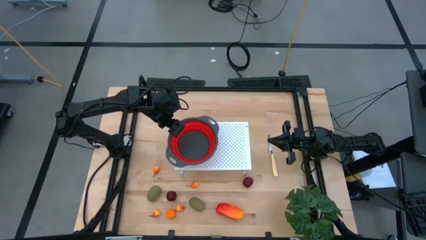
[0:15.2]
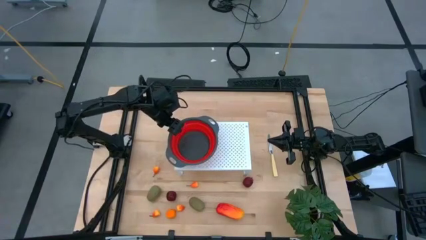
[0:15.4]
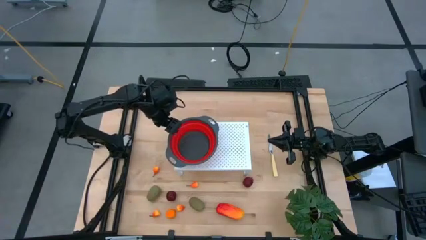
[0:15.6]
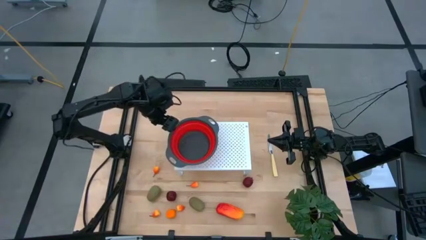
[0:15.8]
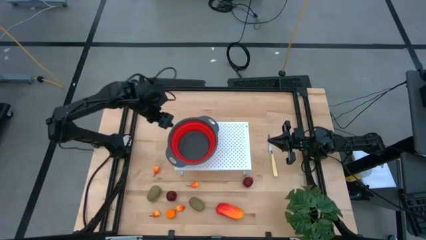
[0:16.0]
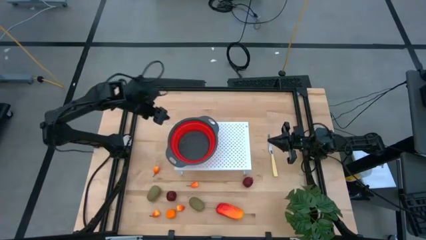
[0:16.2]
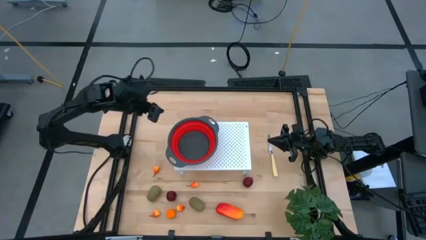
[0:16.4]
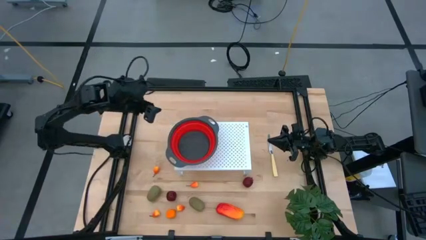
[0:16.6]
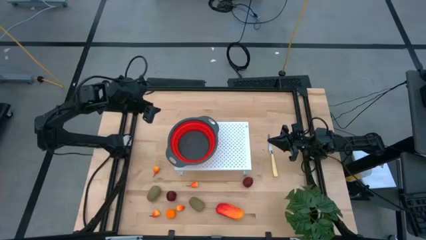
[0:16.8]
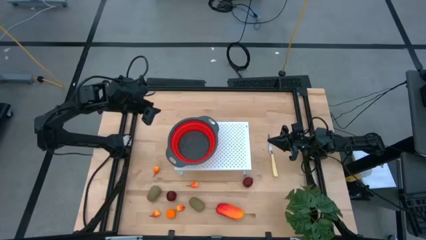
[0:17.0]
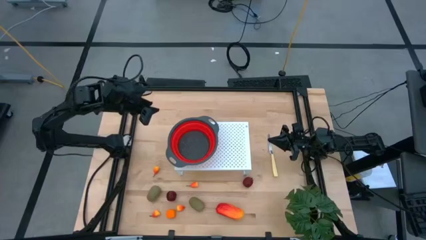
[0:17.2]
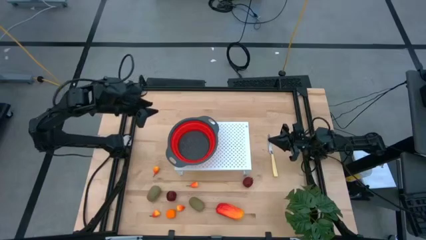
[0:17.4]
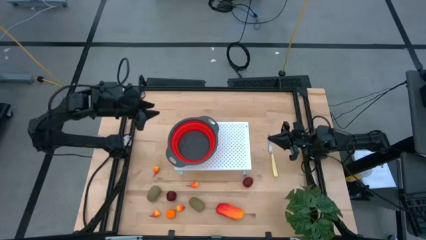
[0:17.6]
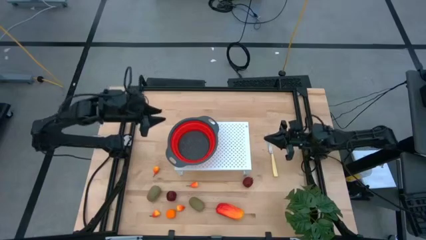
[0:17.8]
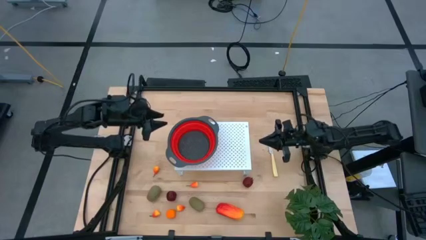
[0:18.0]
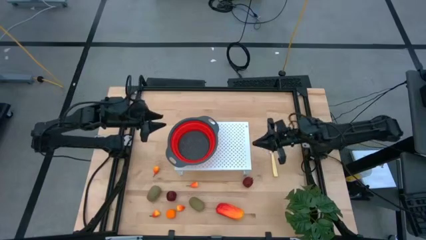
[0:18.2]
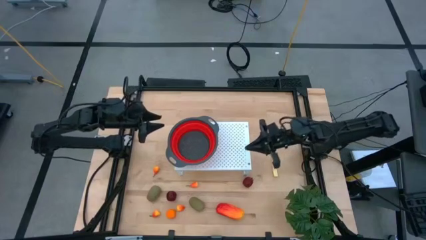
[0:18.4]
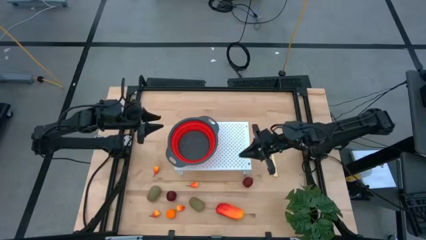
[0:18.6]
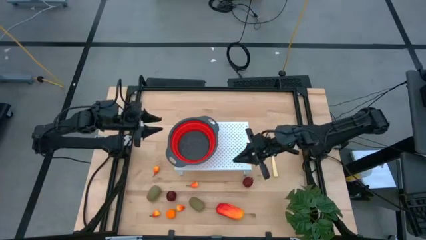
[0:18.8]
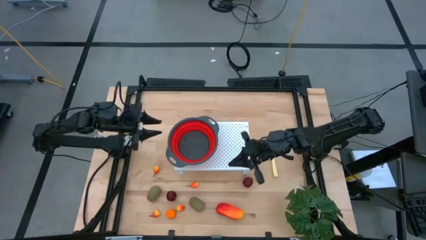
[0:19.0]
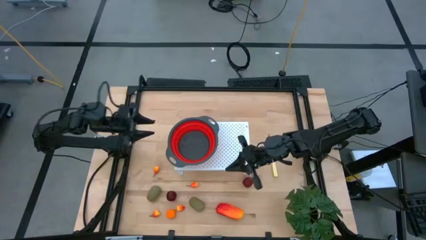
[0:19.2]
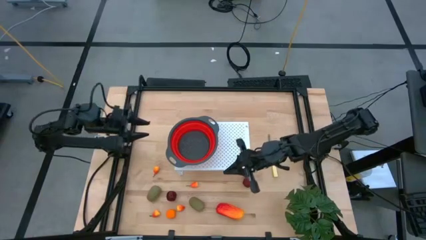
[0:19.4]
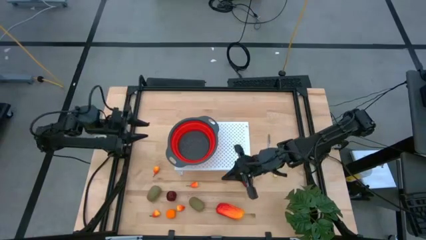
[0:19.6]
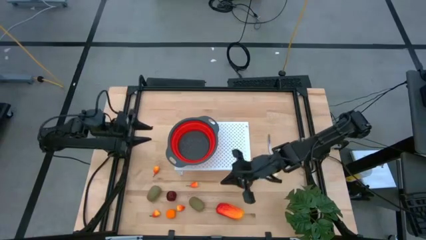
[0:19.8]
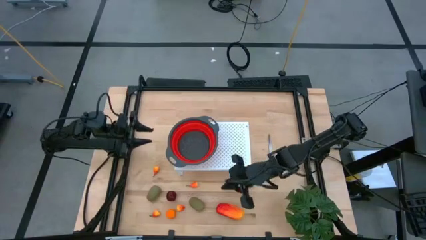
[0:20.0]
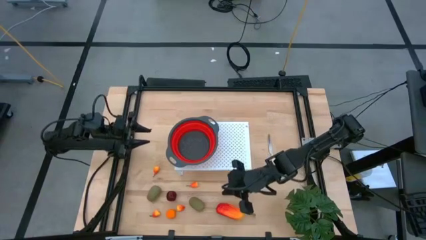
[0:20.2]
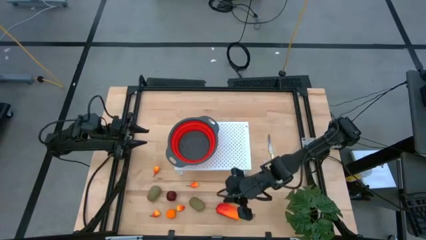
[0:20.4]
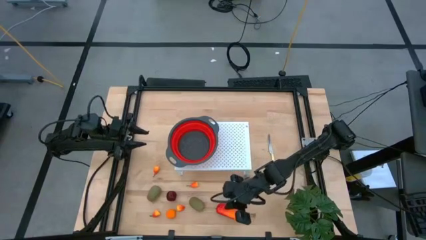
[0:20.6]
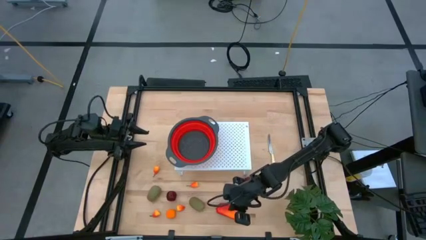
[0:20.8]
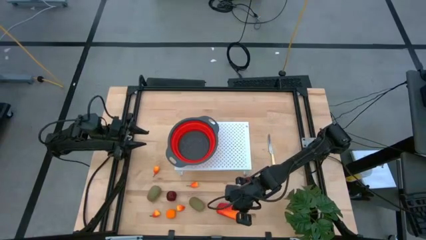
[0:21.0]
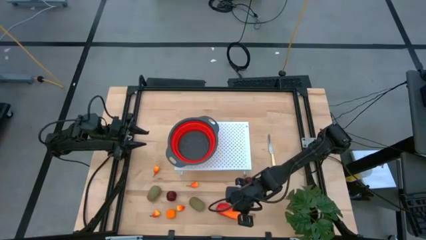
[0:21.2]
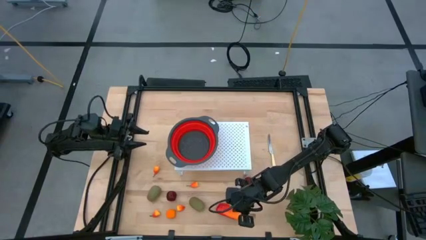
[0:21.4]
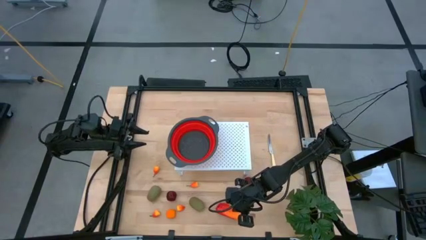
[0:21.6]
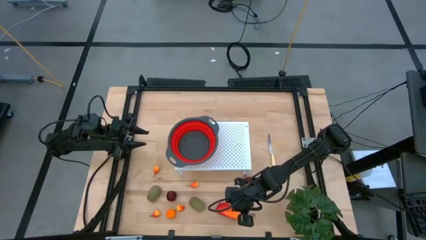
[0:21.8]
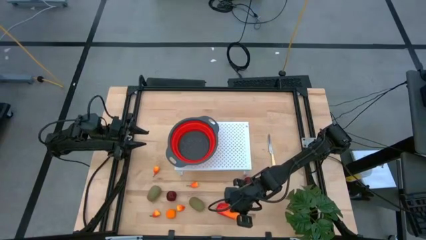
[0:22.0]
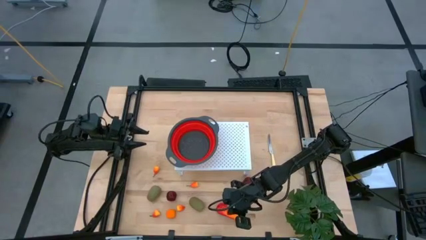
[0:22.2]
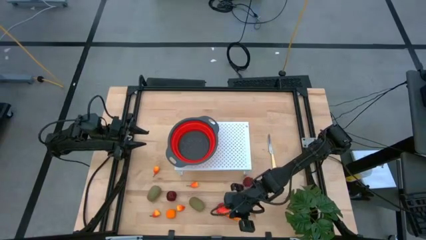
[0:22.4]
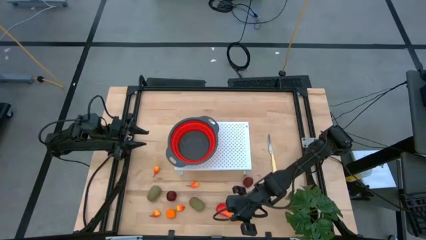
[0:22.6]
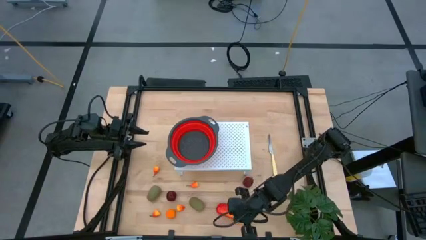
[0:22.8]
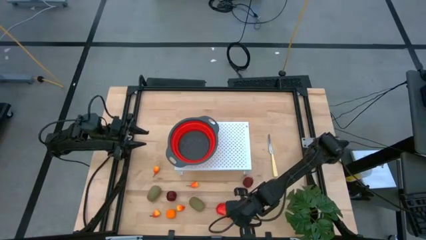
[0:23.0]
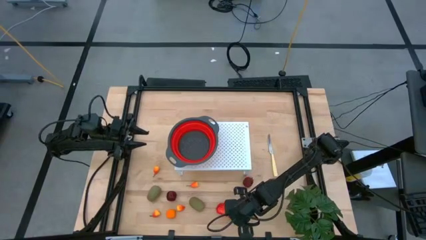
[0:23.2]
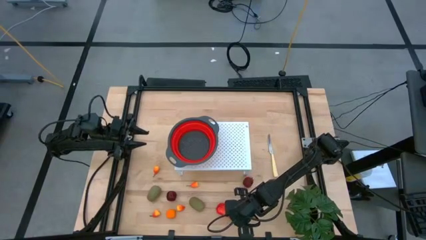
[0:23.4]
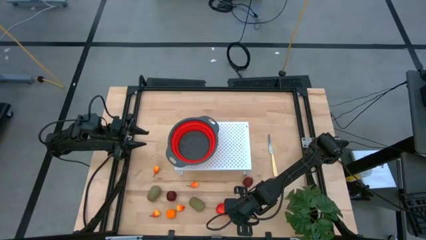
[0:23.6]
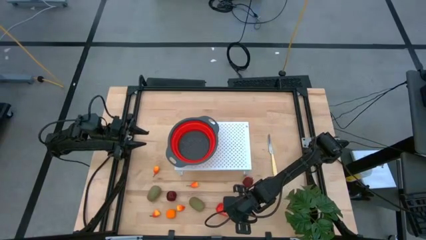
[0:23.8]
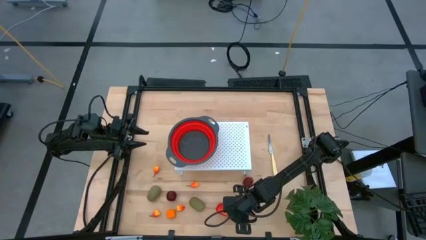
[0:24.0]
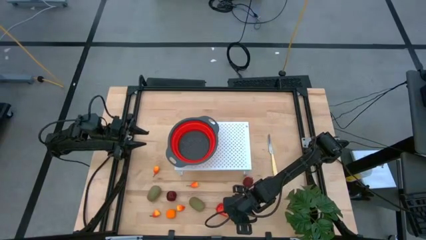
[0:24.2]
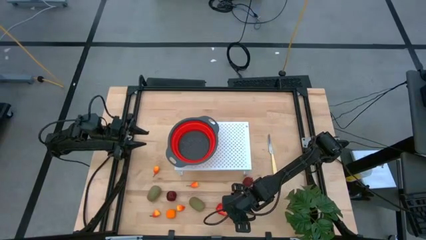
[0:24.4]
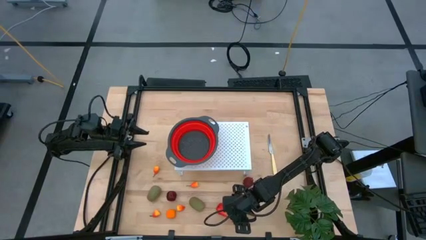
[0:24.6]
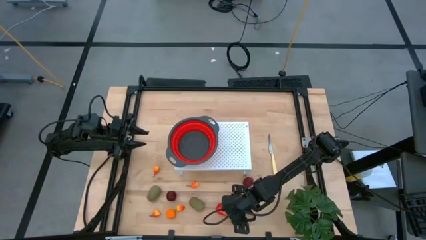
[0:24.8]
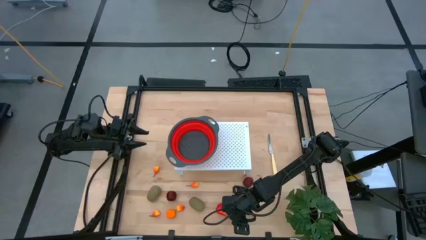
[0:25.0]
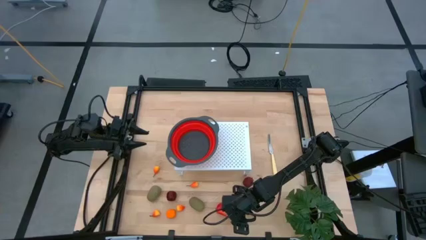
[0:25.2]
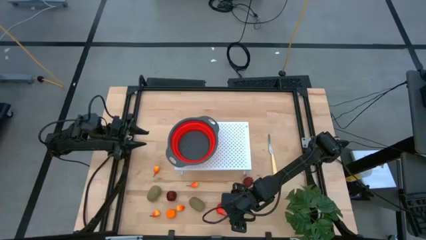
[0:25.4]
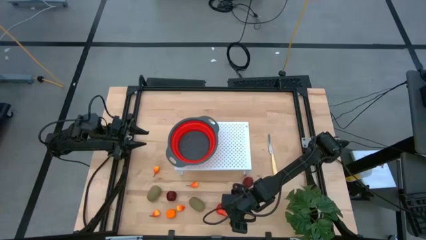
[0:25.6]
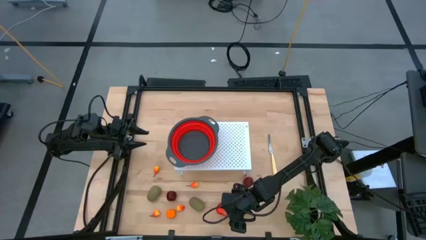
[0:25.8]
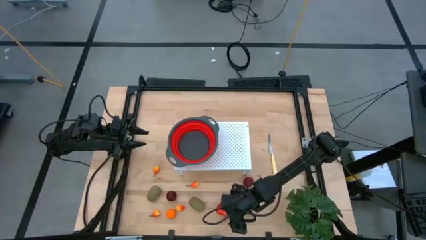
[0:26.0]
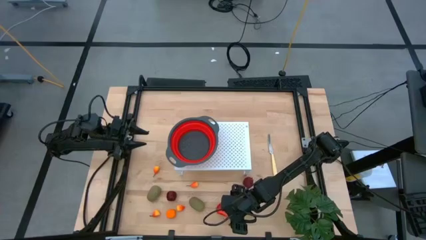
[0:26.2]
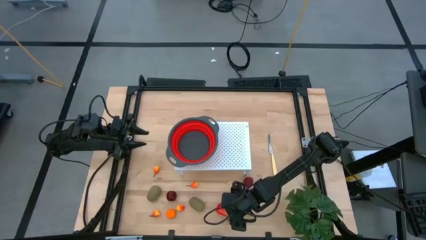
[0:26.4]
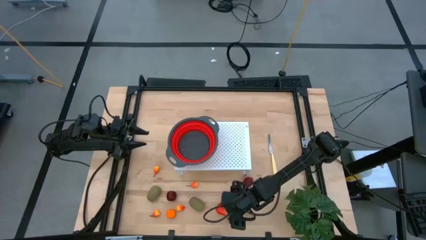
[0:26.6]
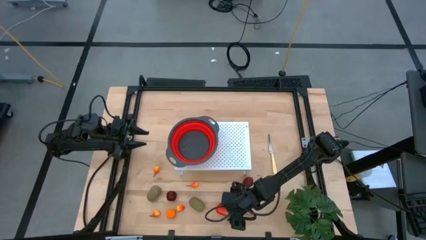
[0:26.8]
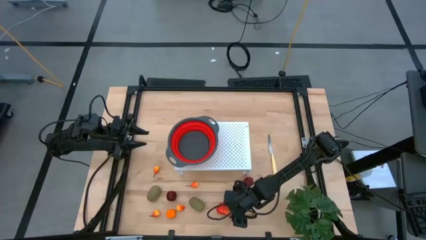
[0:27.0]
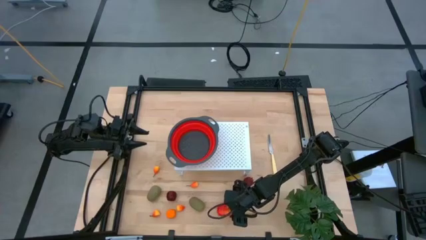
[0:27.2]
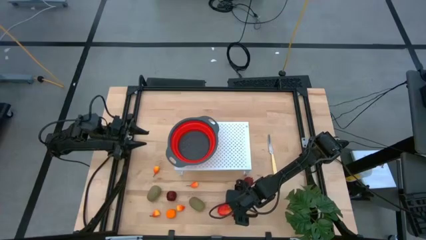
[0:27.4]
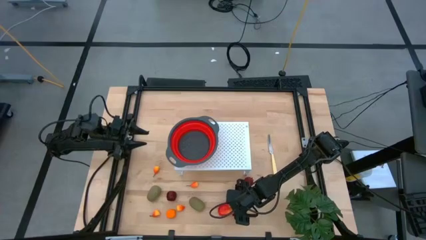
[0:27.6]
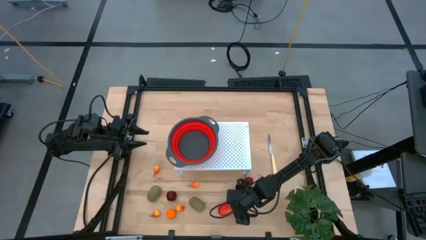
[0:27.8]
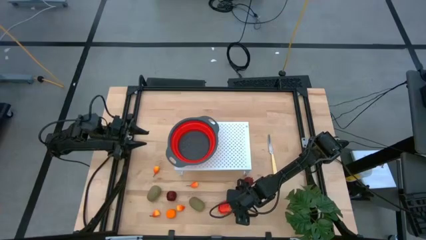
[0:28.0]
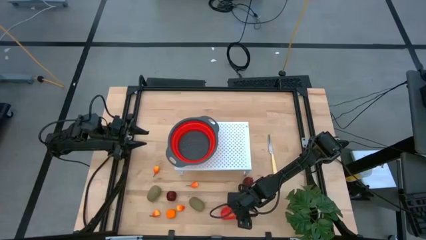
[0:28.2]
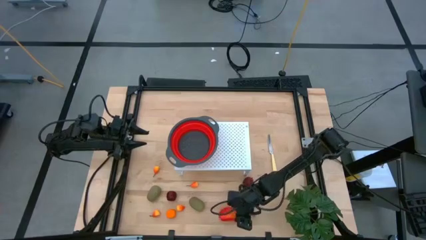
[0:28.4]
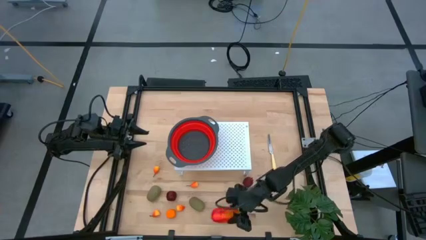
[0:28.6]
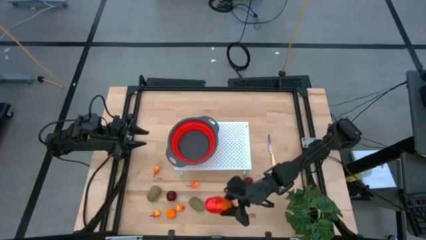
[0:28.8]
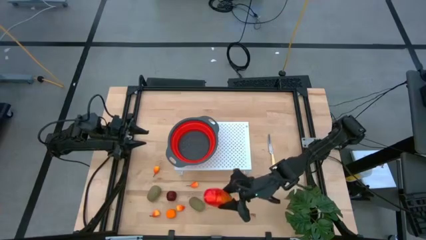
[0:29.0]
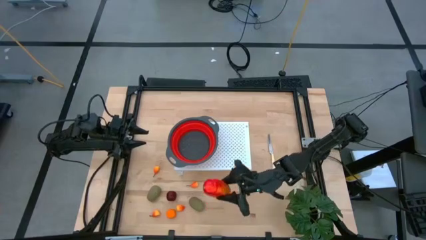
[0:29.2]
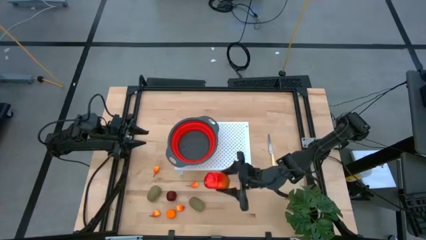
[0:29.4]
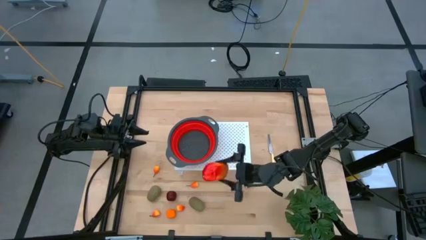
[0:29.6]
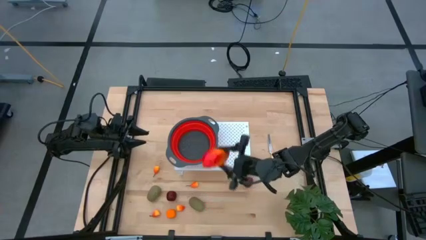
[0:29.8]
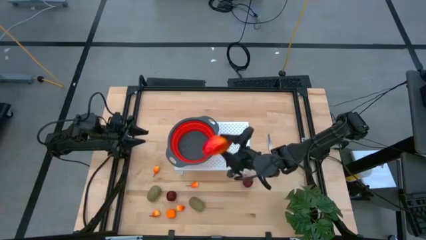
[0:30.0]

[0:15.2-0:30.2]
Task: Pick & Place Fruit
Put the orange mango into the red strainer bowl on the shelf
